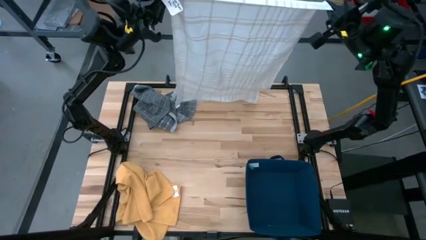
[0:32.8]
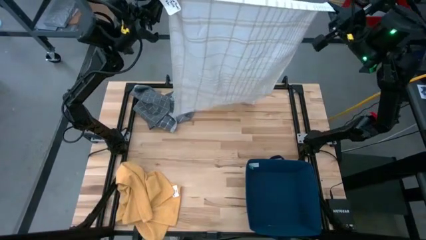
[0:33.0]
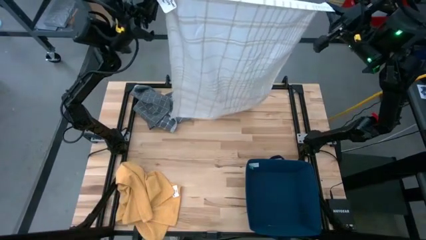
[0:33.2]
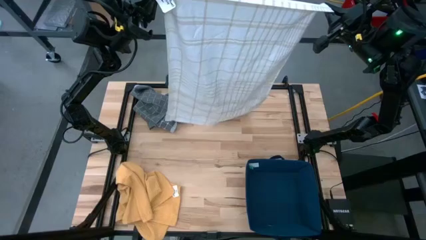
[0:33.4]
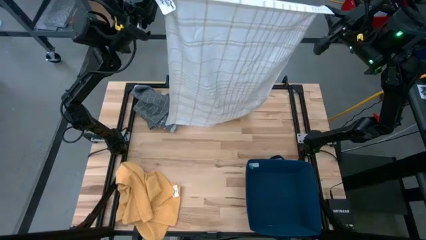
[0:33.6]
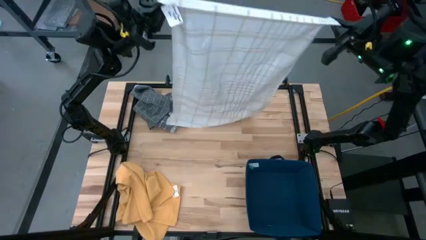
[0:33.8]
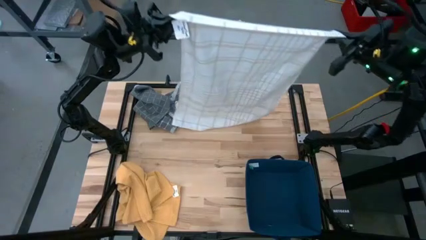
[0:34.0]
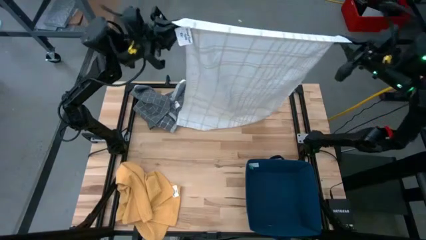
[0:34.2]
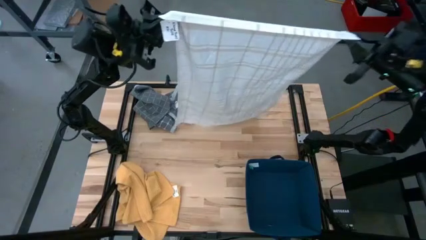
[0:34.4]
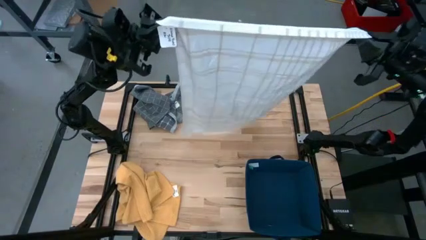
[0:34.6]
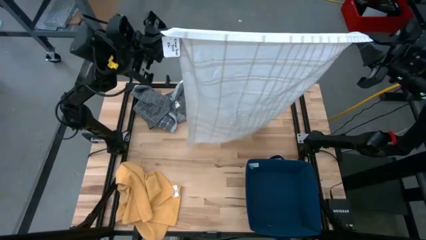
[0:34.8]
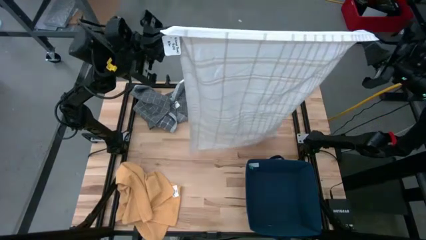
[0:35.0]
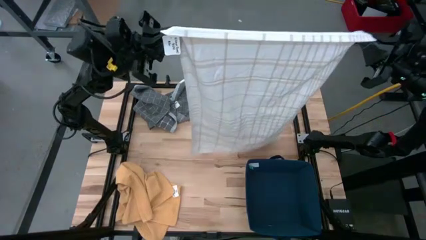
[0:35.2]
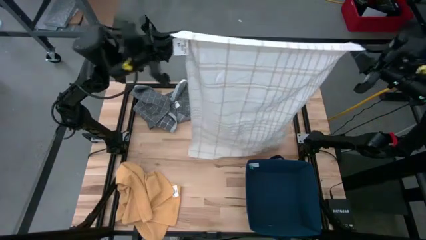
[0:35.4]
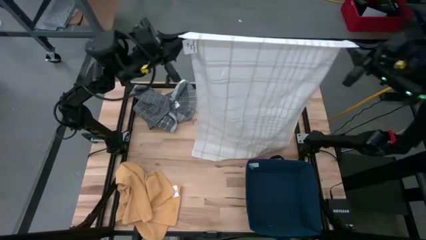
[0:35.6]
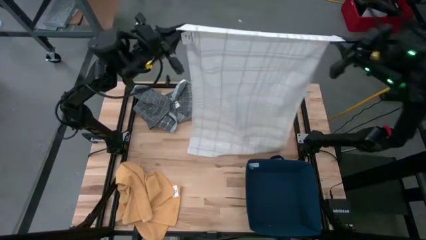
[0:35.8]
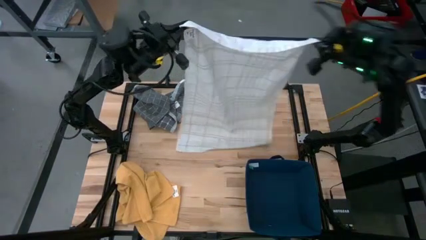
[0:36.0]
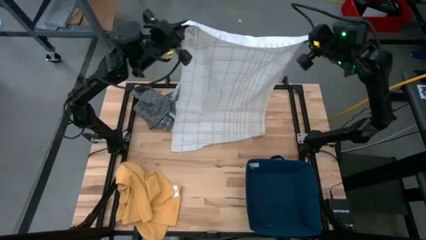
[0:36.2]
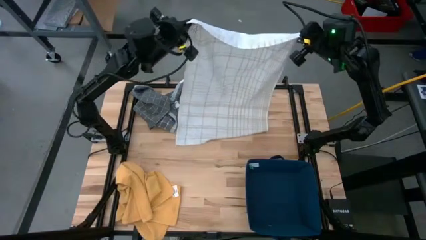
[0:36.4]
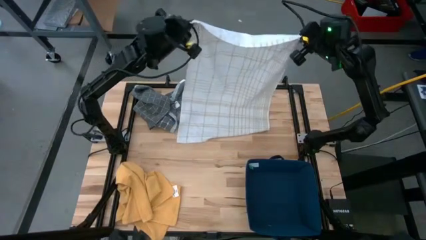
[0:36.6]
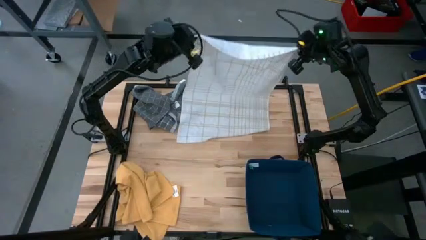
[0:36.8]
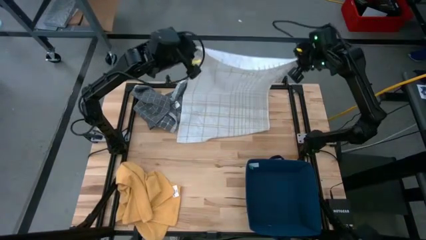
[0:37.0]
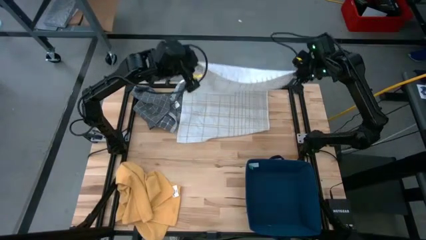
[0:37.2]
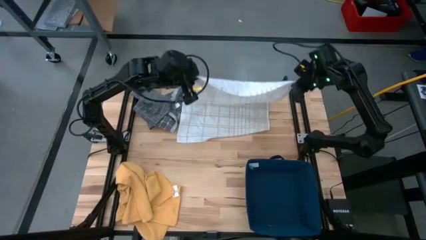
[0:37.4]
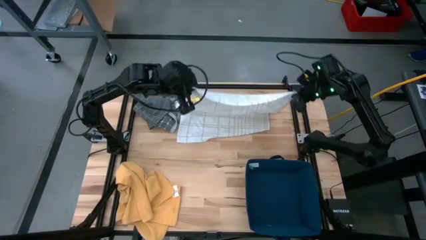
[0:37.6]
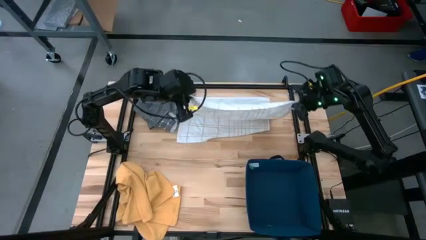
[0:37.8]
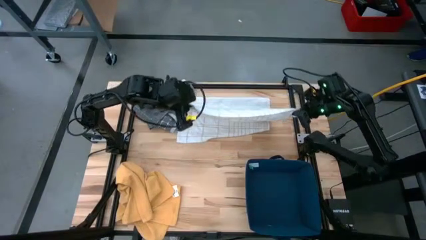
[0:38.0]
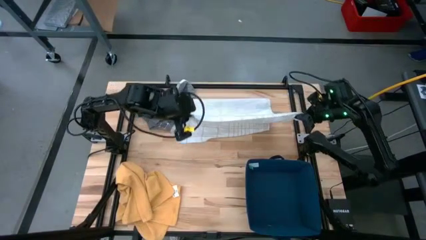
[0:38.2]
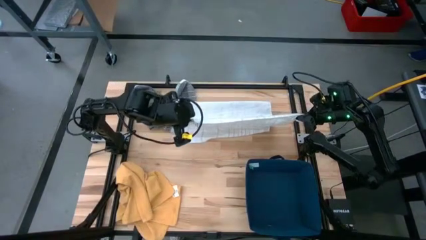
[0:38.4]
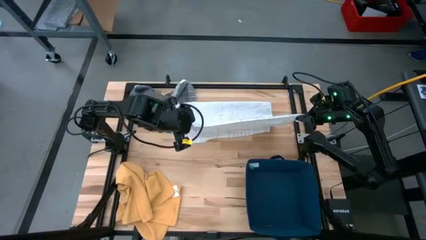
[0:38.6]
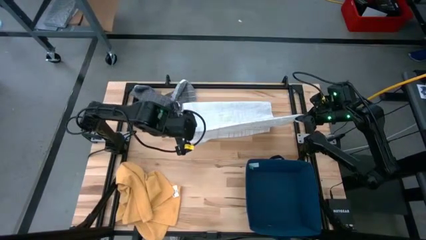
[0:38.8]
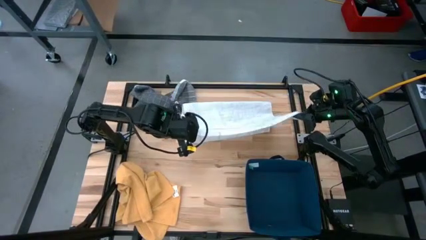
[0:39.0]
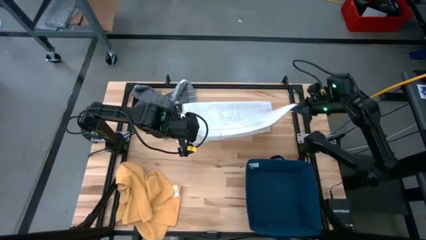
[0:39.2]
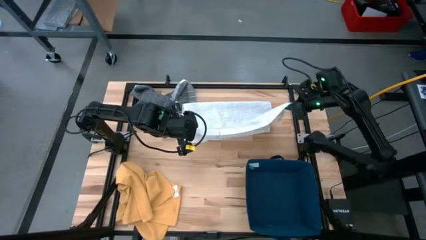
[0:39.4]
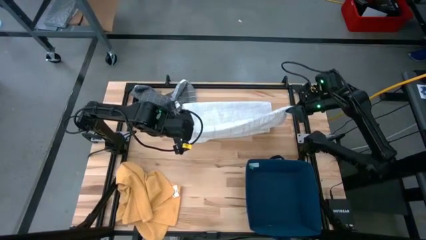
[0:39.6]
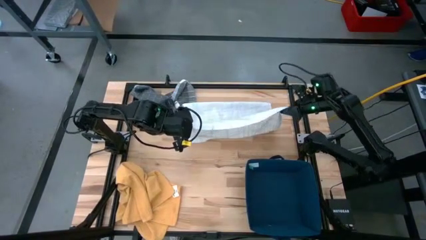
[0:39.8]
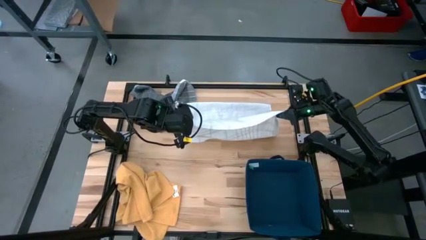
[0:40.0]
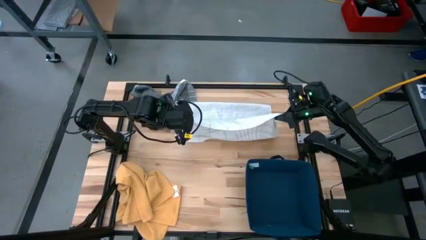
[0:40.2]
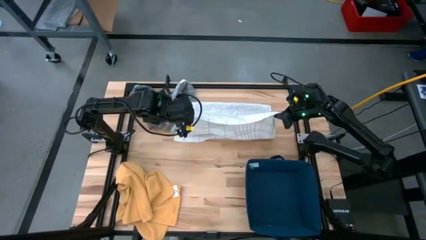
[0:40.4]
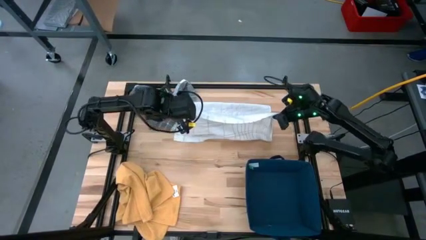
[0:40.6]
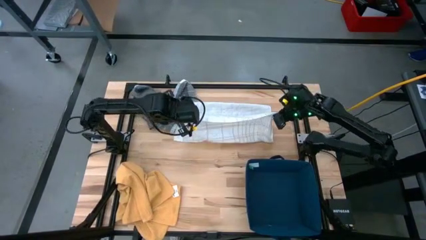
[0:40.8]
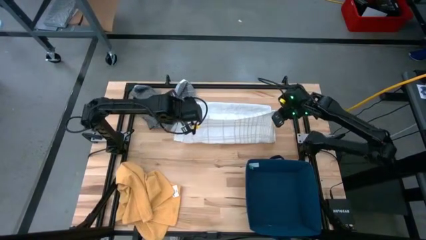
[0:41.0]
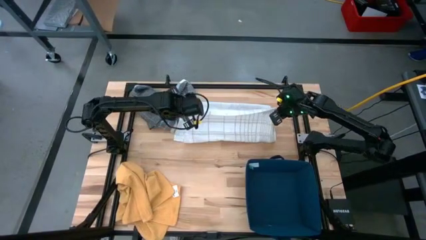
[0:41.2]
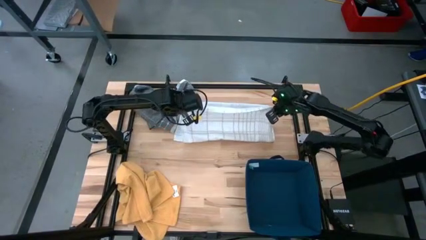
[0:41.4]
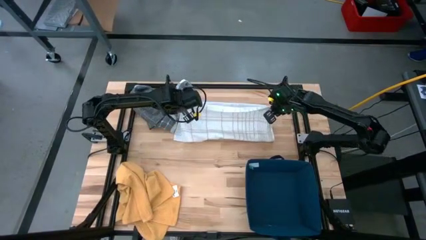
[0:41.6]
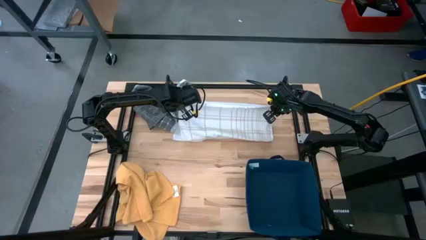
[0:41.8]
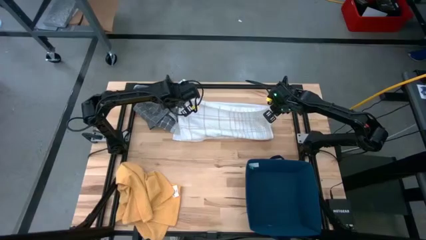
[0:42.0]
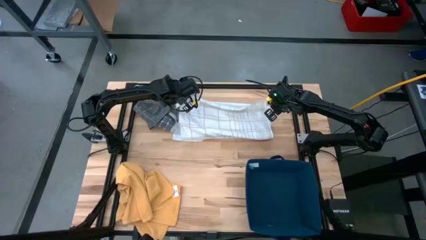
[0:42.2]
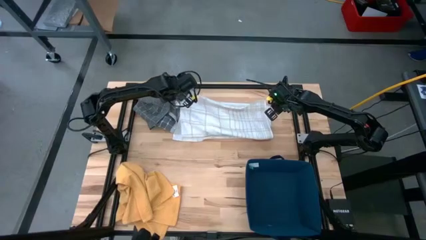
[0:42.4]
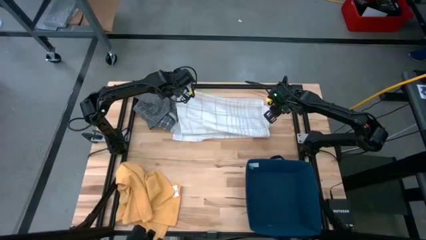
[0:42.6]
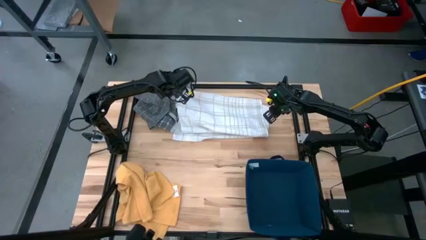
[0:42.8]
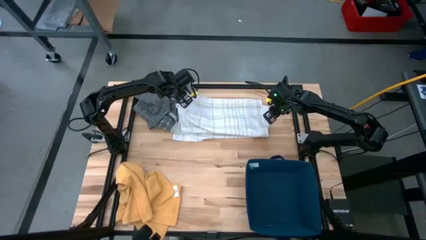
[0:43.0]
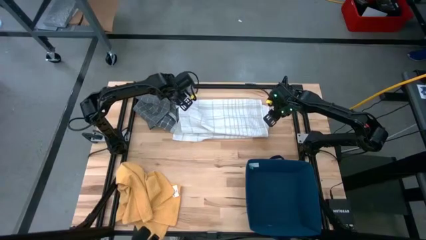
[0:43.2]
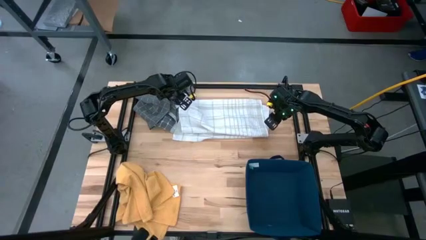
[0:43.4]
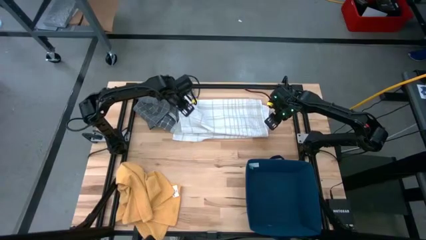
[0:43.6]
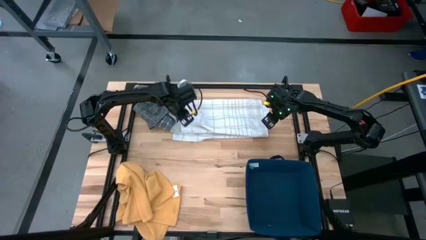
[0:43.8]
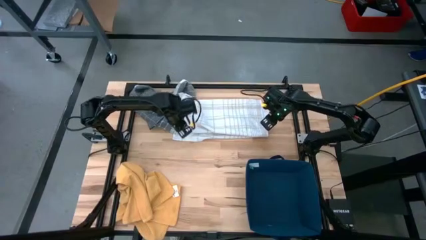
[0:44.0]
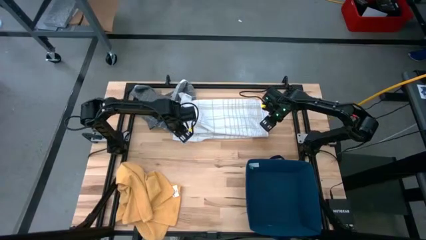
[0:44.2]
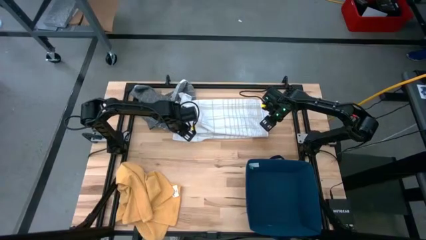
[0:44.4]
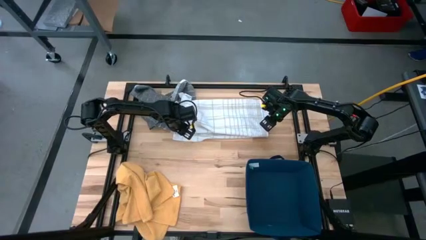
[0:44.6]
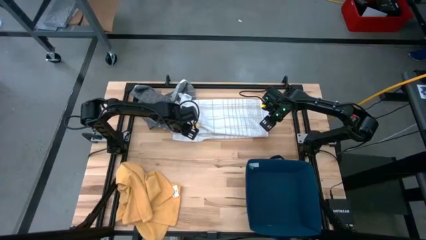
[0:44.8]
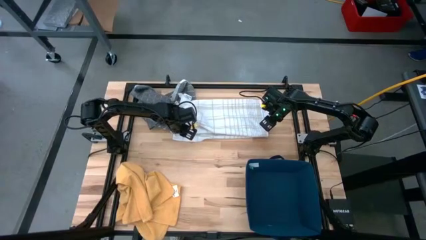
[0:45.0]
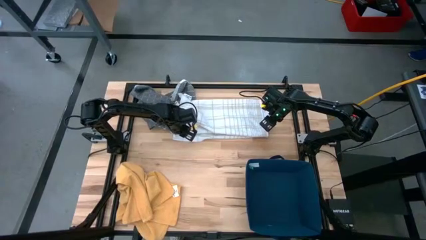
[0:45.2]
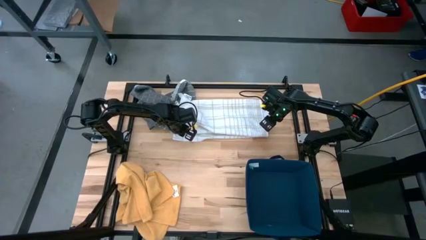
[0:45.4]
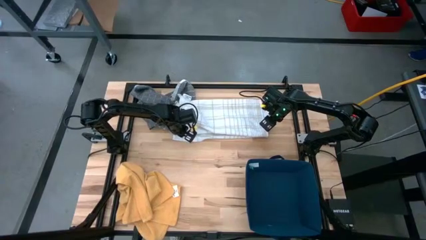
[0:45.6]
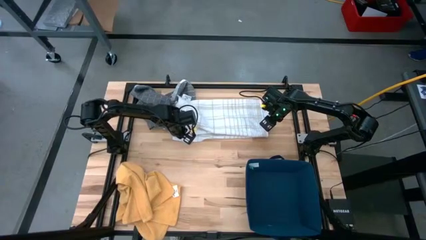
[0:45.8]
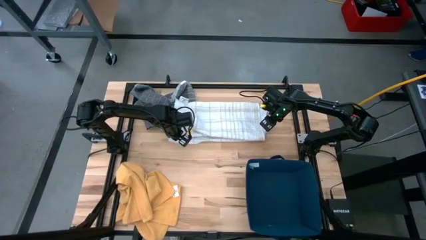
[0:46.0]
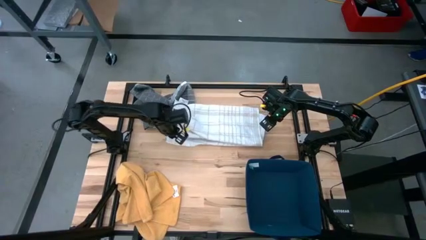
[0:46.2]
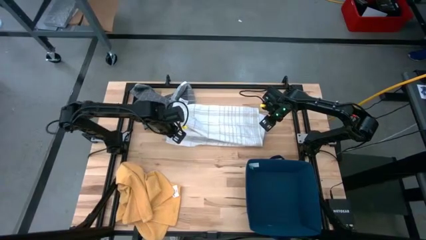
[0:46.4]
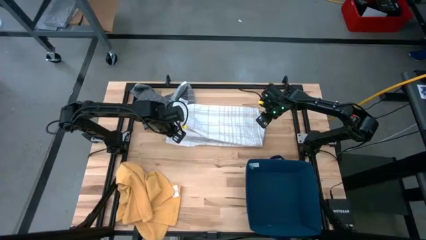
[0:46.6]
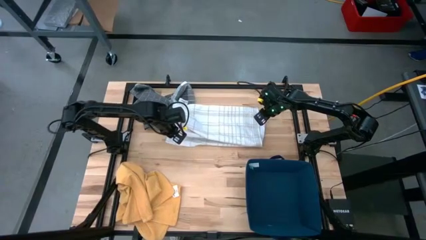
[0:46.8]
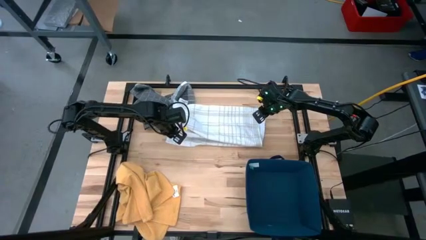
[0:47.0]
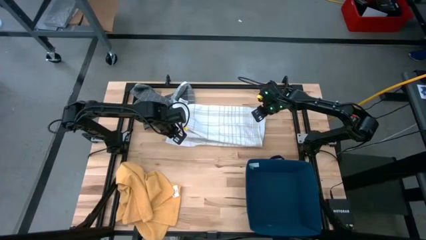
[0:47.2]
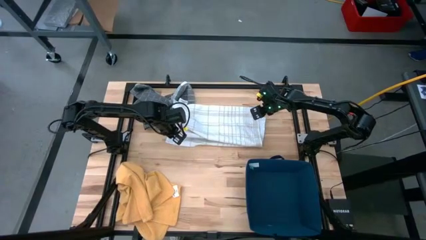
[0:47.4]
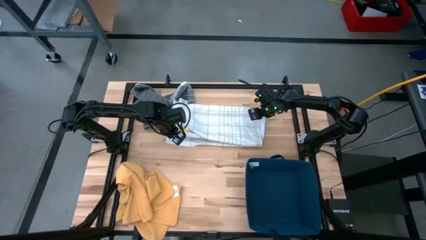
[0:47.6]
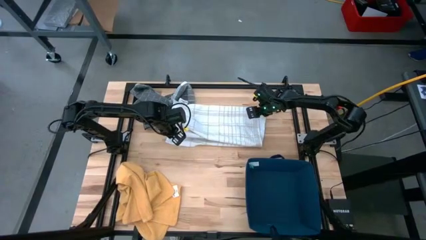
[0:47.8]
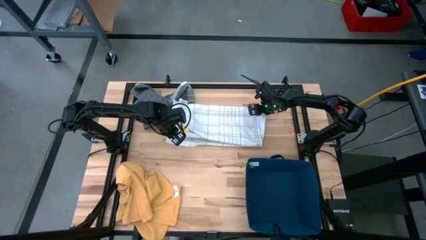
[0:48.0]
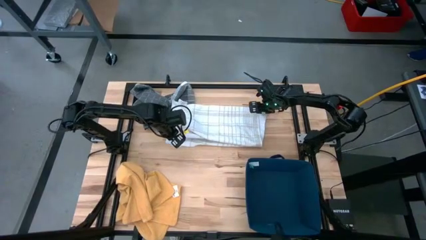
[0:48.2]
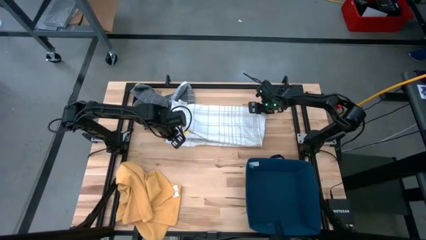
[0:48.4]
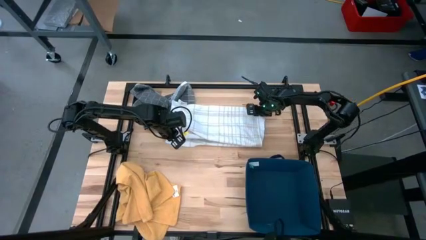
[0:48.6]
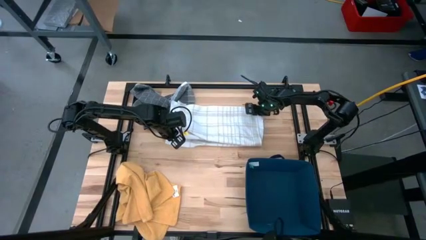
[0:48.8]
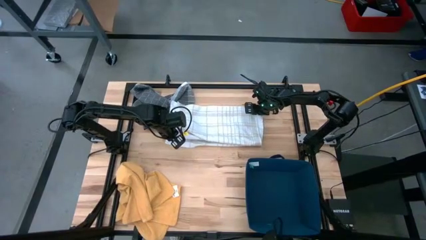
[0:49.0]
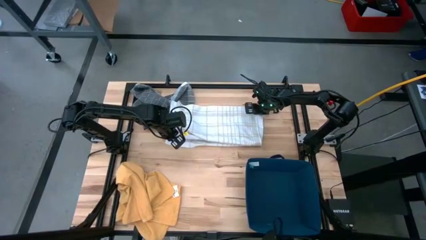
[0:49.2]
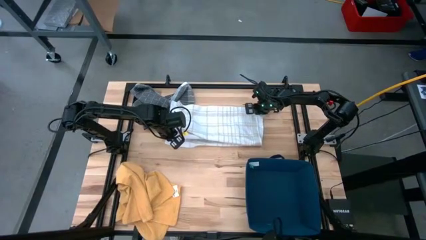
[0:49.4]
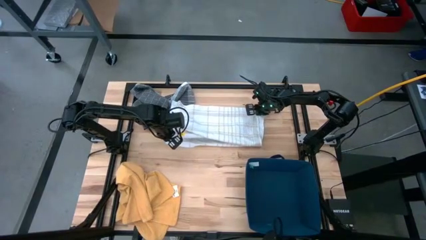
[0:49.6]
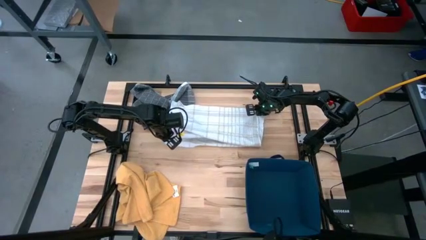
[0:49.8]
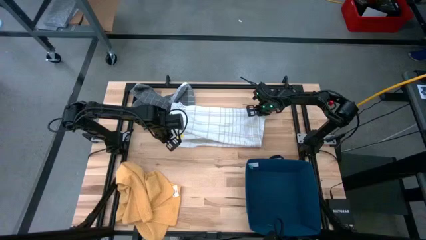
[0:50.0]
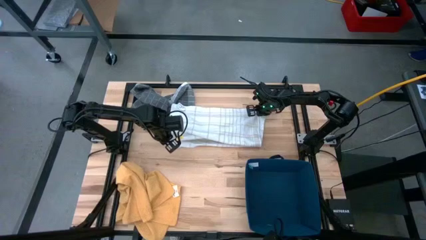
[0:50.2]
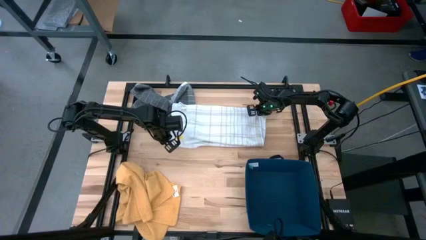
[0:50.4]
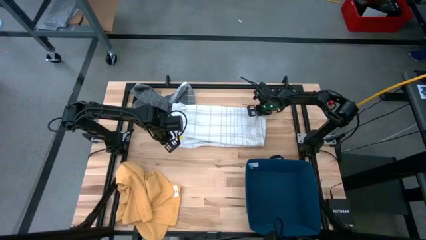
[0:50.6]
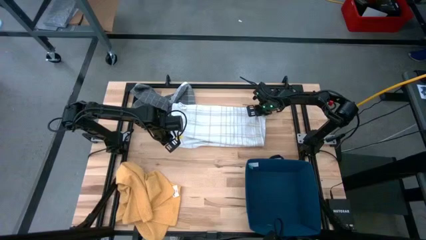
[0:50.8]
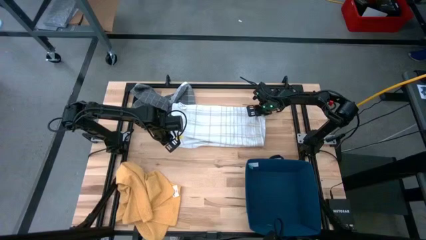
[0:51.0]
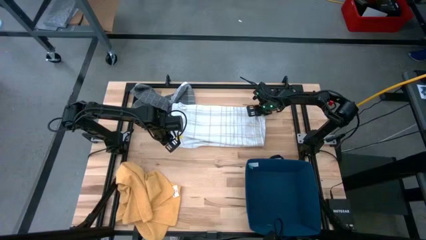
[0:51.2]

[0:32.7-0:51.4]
Task: Fold towel
Fold the white kitchen towel
